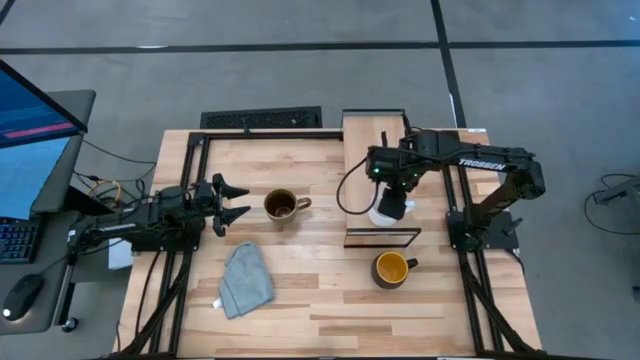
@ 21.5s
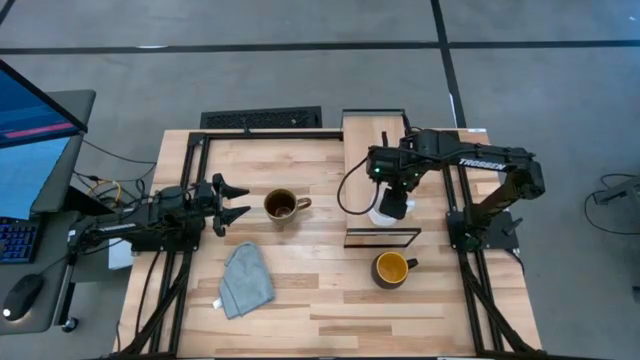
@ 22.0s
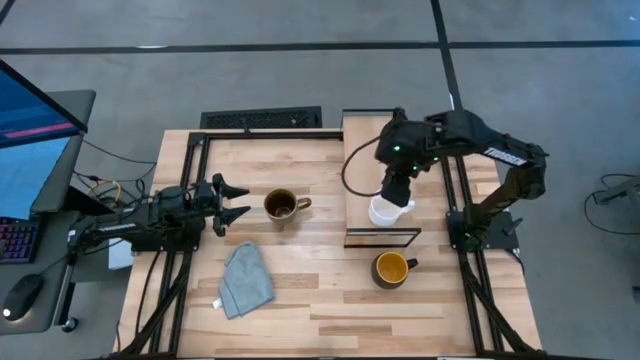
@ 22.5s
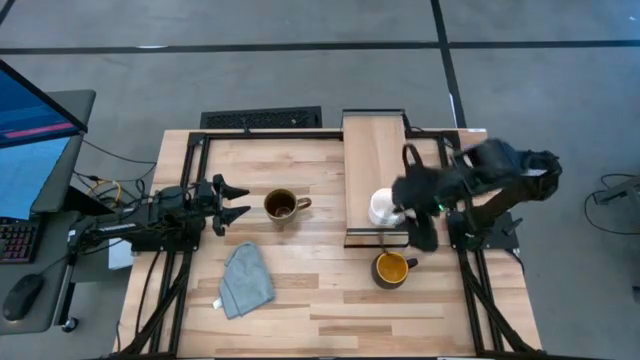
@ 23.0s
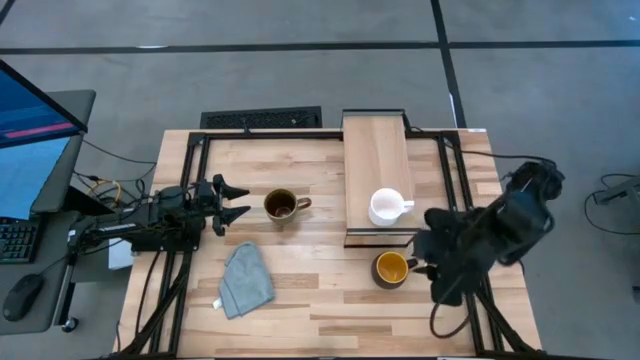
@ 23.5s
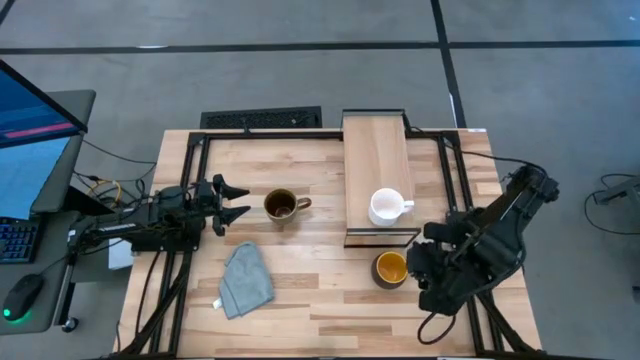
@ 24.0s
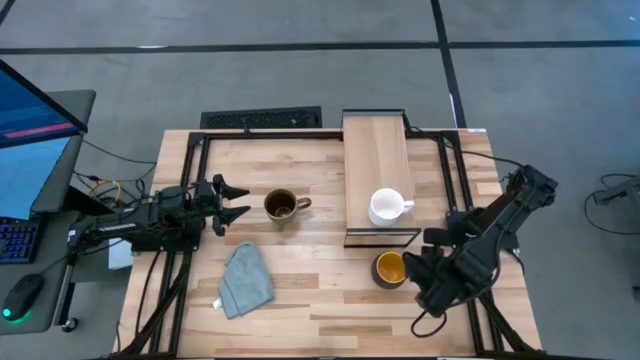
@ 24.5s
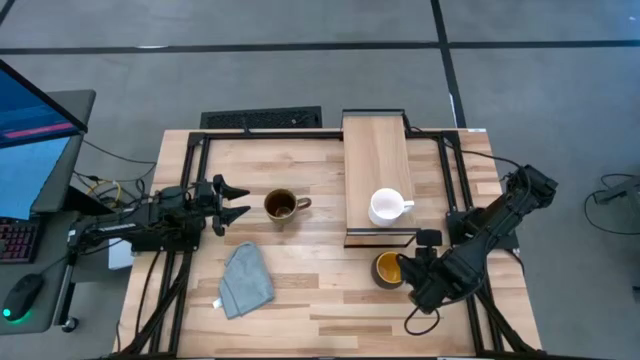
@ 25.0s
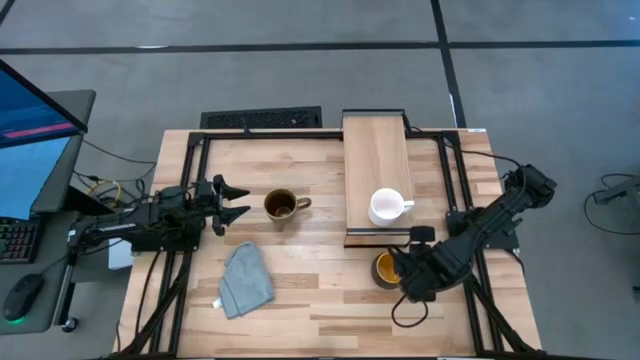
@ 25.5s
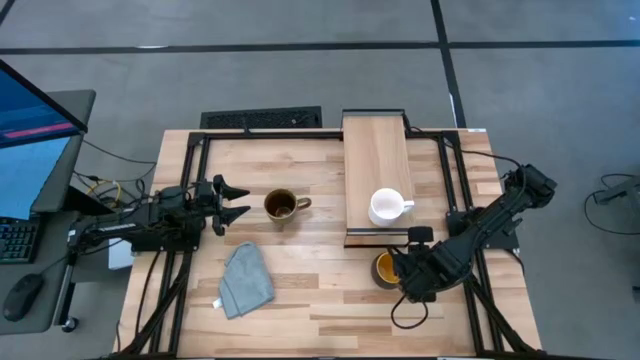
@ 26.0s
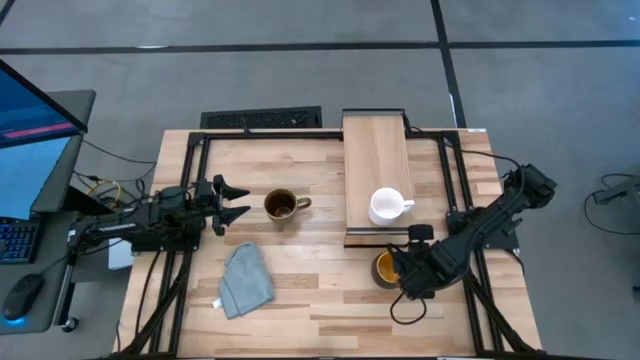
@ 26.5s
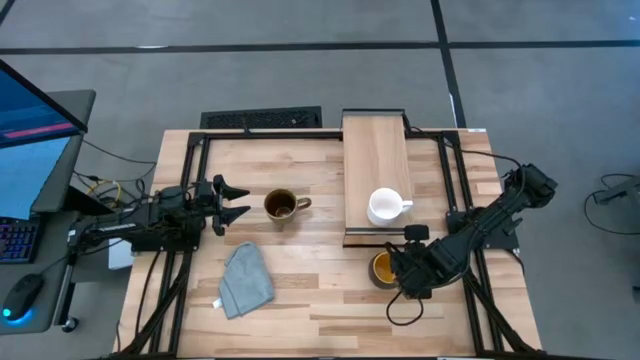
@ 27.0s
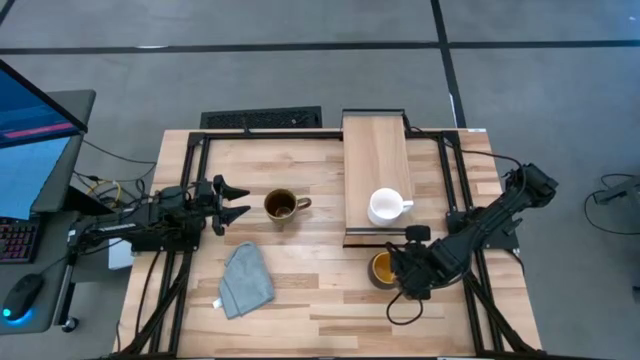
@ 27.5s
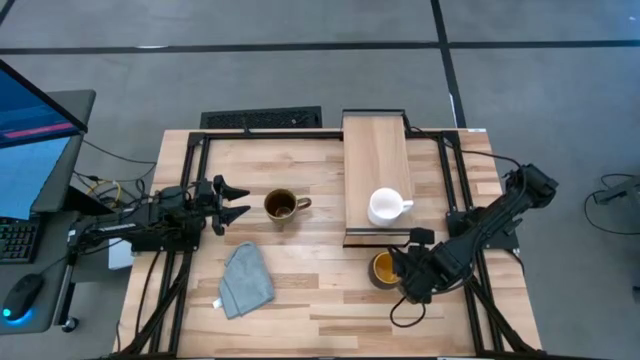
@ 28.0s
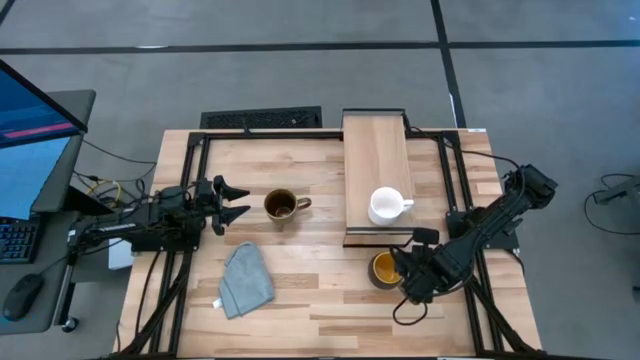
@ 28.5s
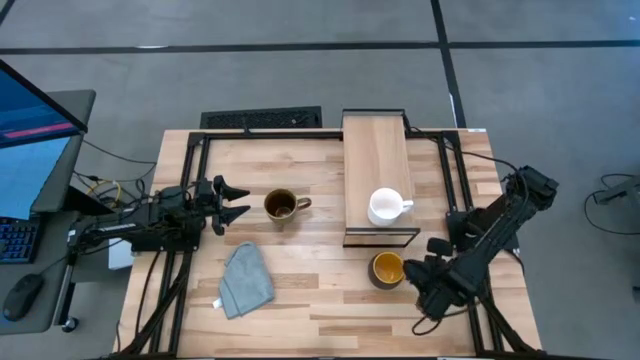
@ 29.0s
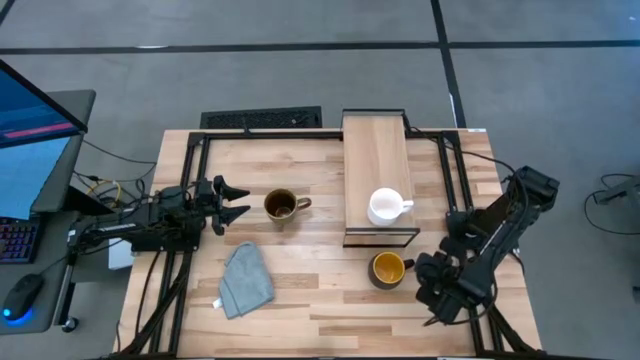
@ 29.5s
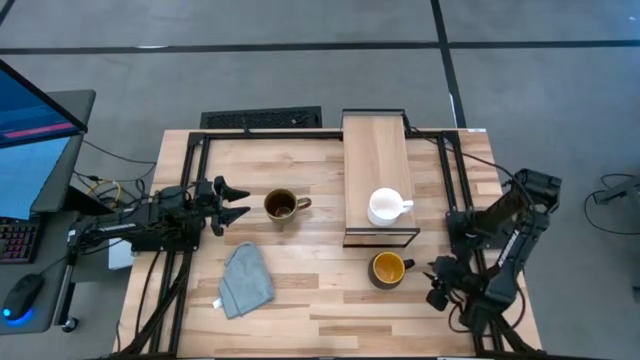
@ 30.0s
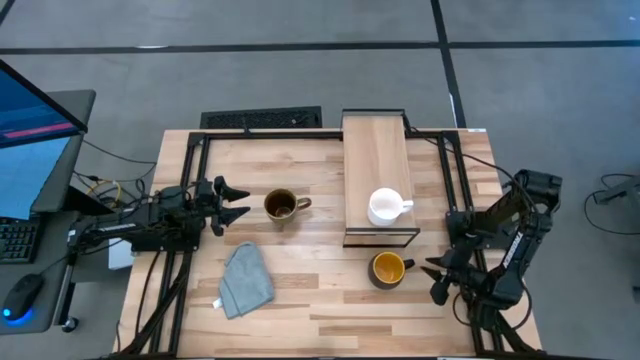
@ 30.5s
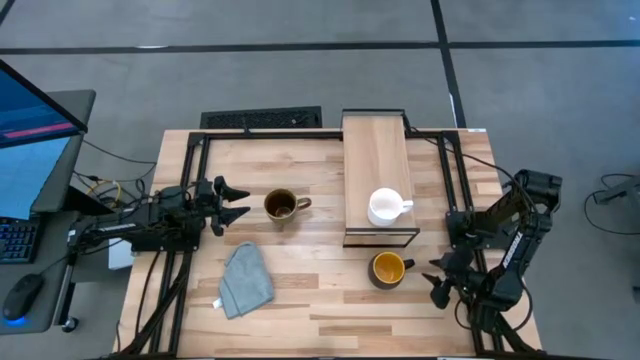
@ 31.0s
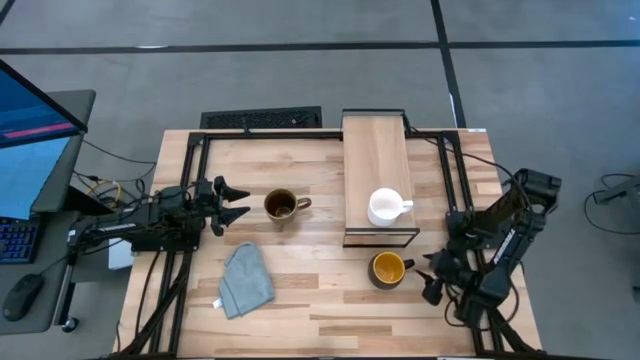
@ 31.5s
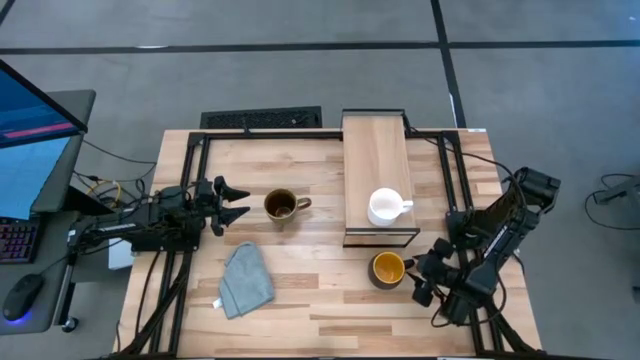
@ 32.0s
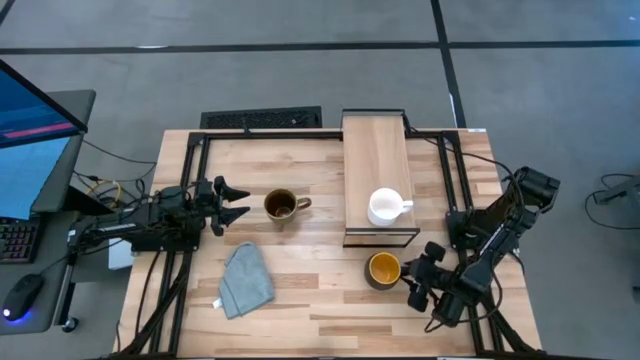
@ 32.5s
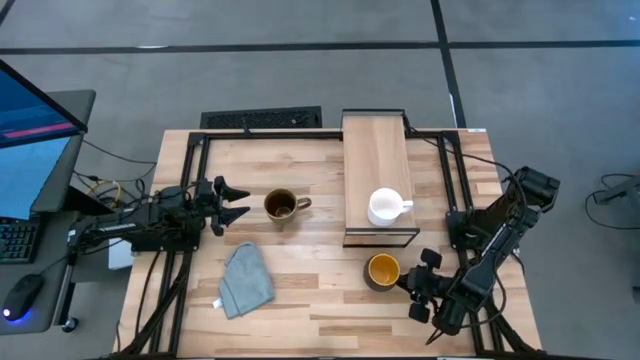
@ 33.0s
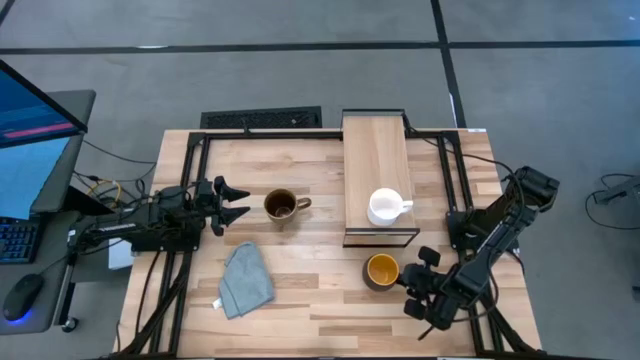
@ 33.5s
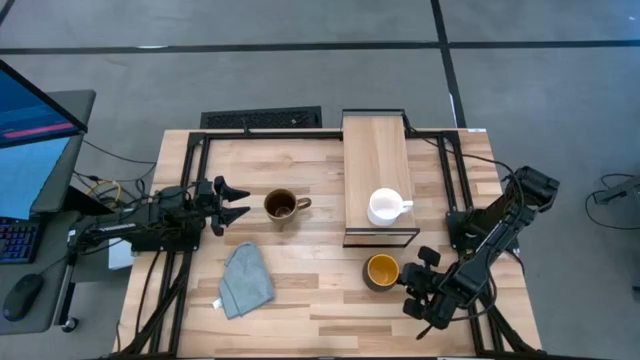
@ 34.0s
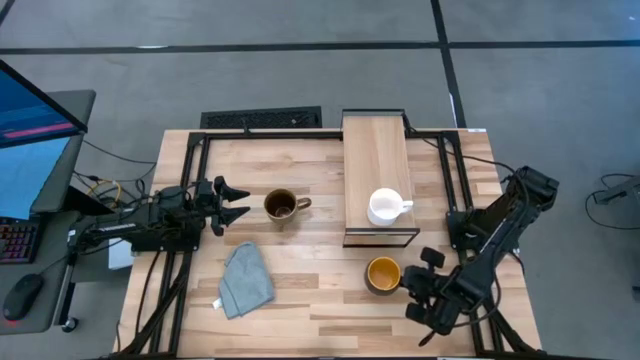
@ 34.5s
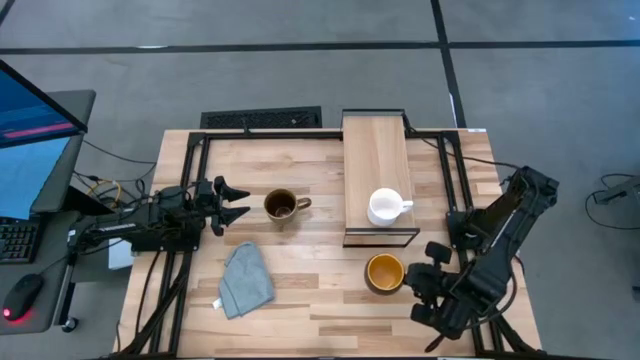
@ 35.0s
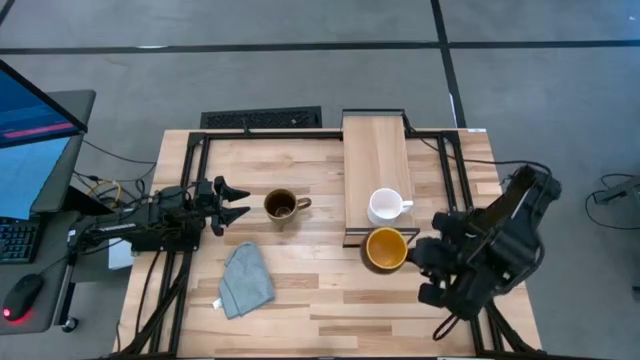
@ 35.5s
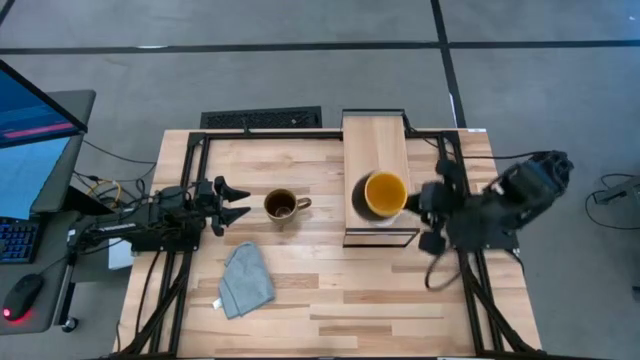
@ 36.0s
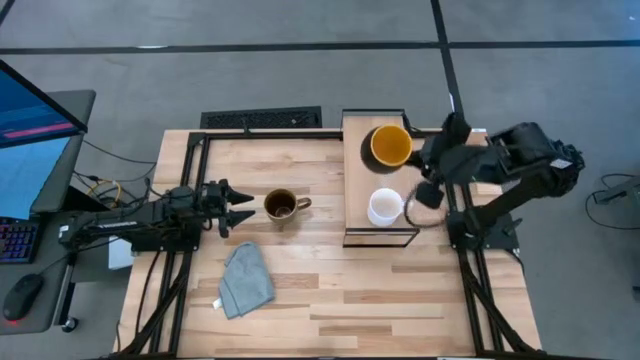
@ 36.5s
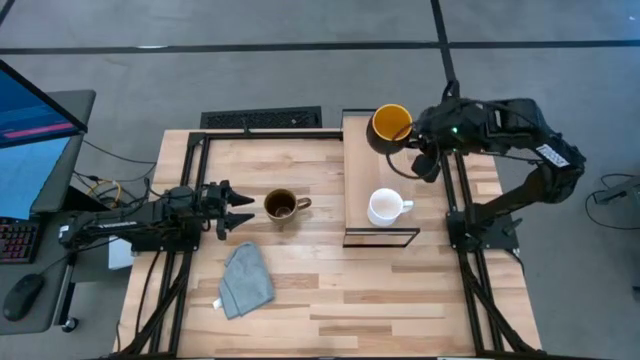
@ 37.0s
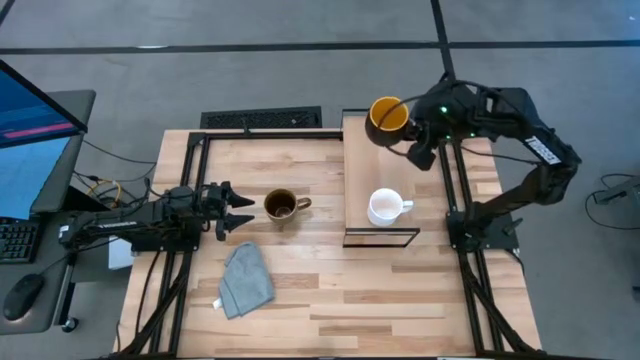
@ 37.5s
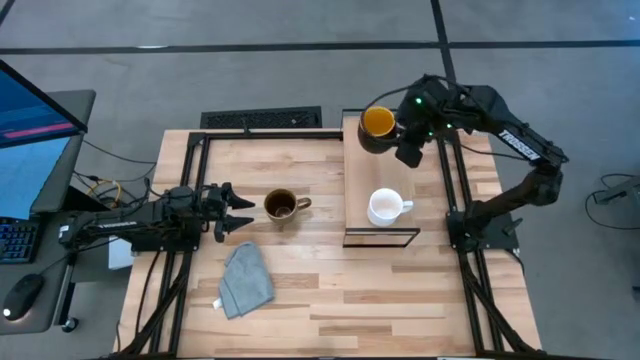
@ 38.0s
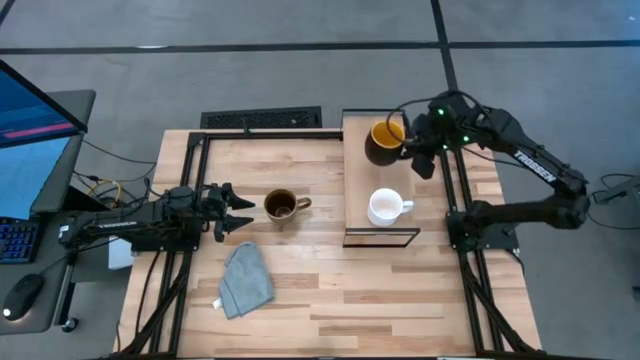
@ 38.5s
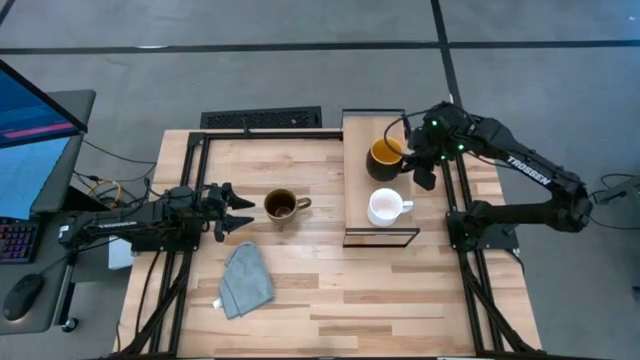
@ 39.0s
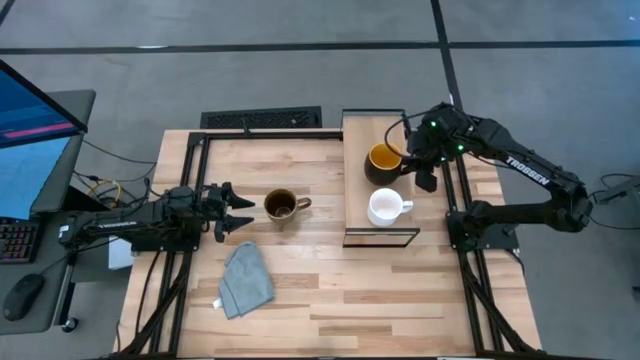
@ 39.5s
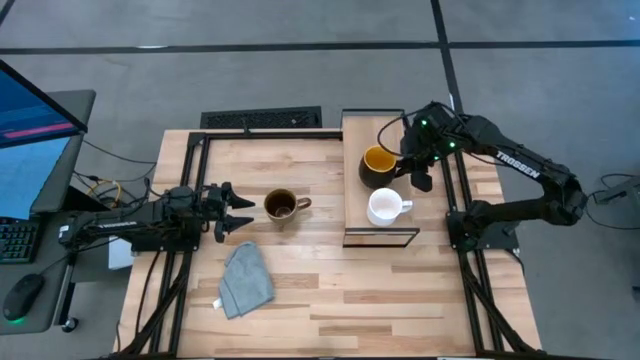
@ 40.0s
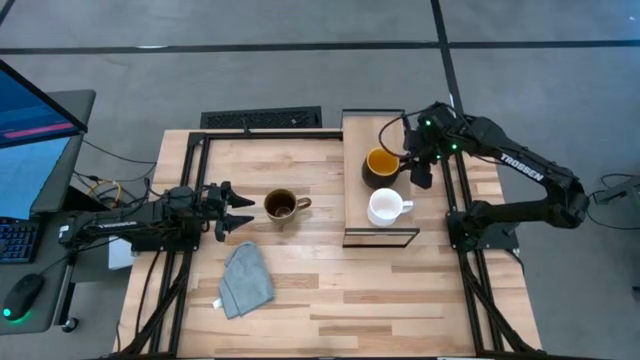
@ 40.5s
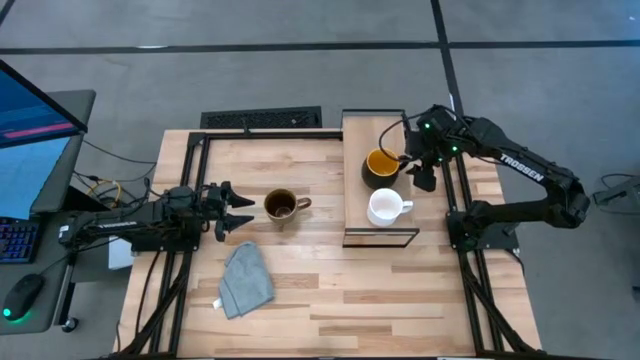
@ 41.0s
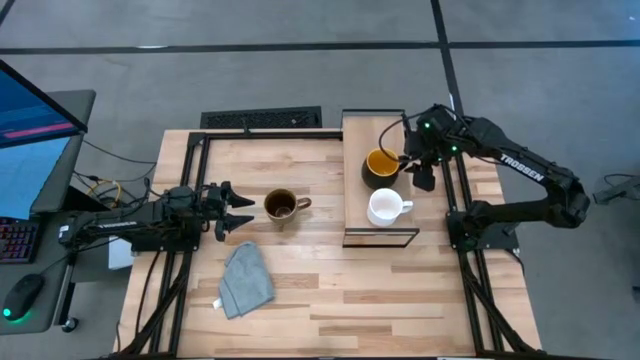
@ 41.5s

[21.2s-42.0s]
Task: Stack small to large cups/mugs on shelf
Put the black mug on the shelf
